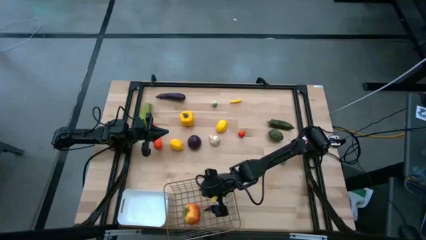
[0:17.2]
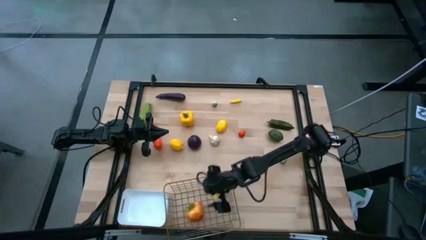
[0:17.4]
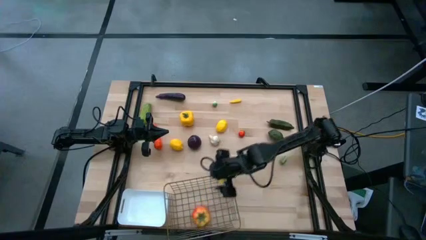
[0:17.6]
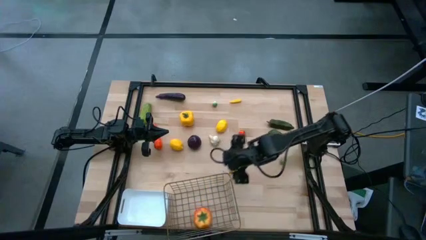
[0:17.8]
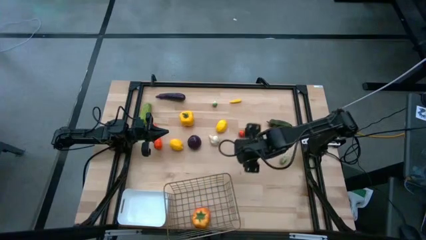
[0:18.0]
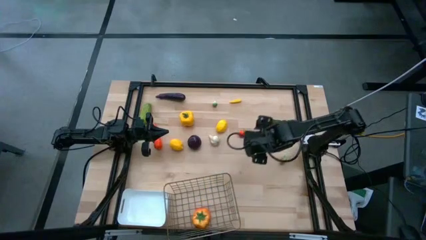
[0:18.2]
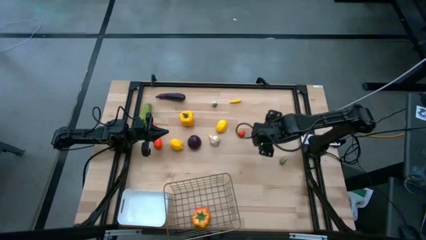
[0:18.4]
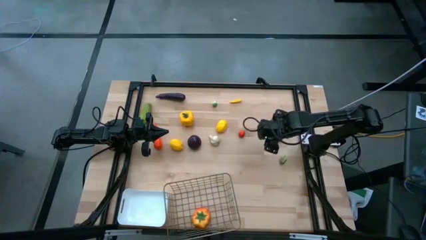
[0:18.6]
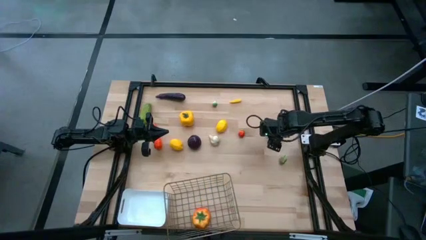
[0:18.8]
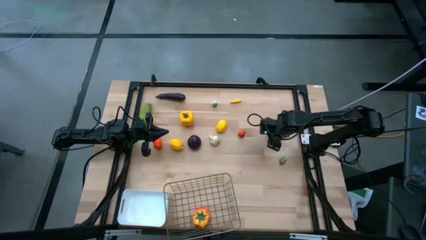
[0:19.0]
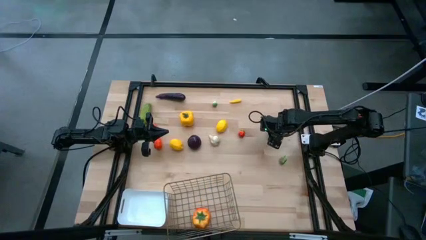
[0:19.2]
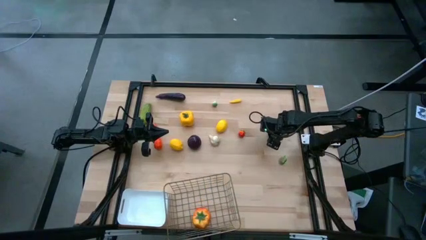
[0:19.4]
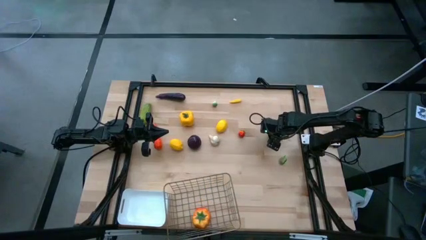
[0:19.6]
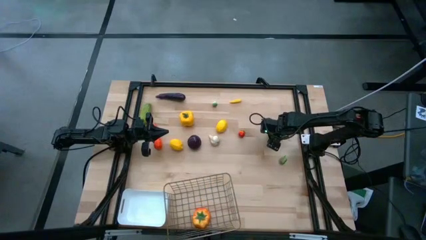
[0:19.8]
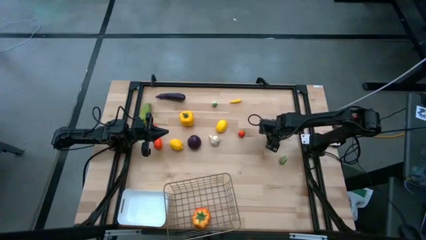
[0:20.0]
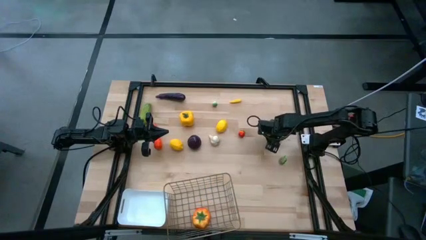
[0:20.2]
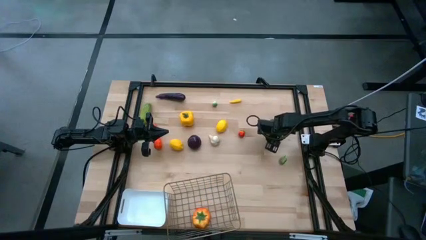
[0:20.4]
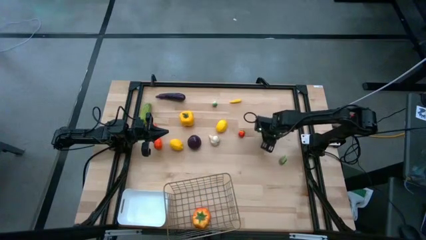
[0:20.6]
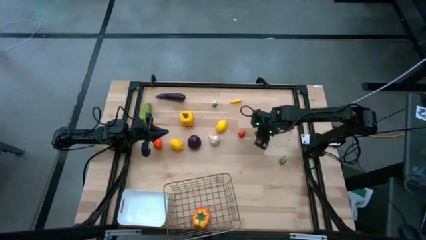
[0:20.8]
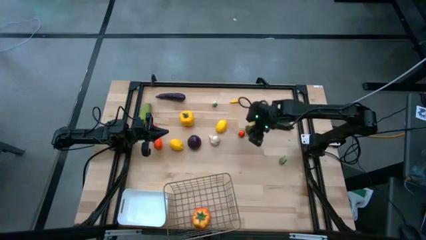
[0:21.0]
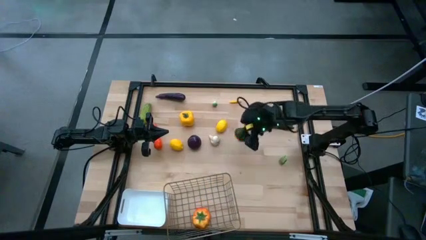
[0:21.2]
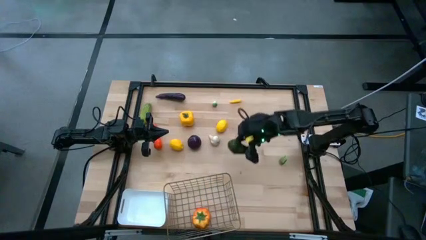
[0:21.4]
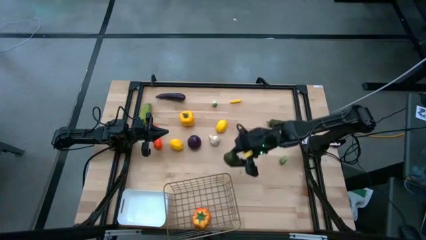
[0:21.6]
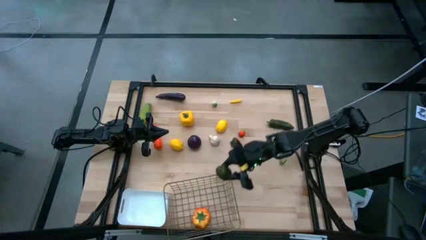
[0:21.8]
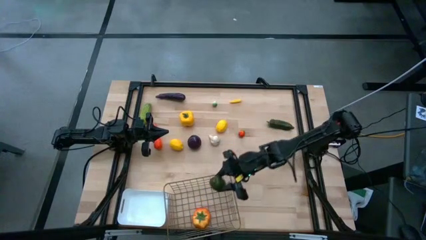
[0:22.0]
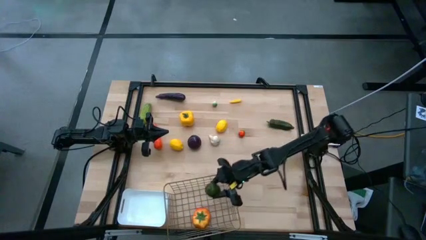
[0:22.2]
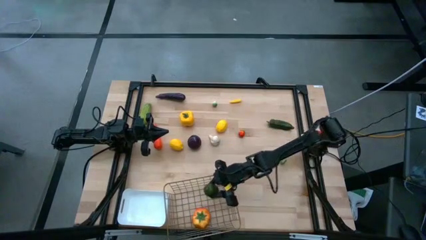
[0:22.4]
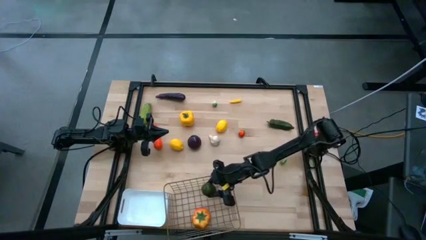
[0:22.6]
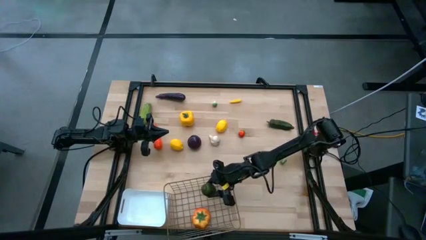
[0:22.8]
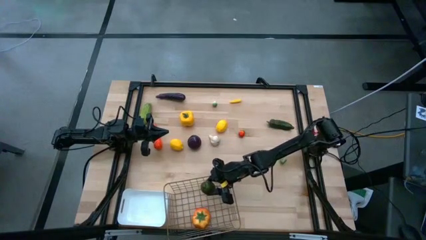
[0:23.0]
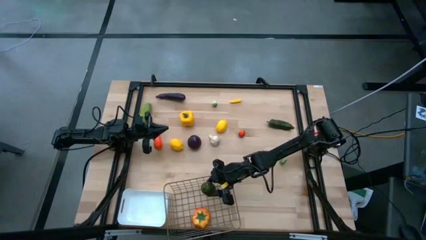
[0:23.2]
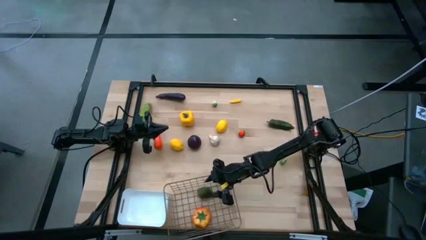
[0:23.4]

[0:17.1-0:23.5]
Task: Sort produce into baskets
Put the dark green lime into the wire basket

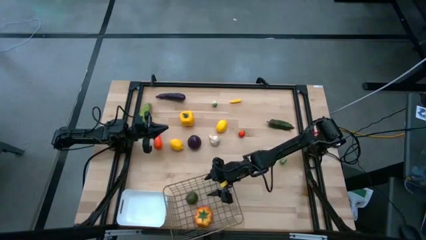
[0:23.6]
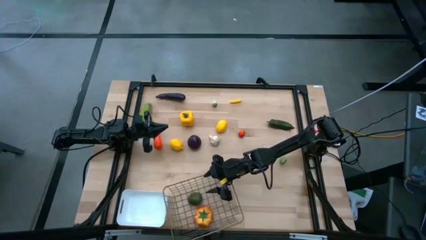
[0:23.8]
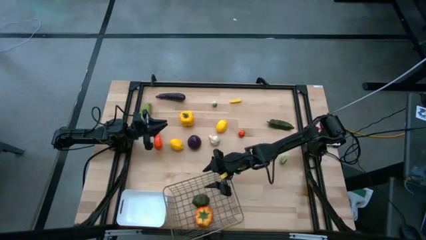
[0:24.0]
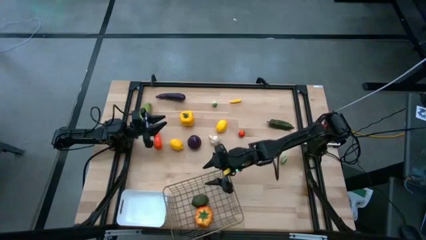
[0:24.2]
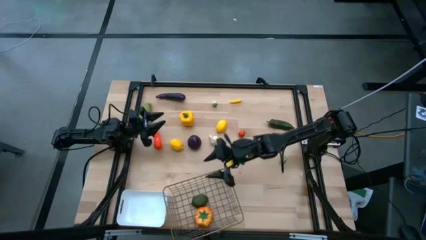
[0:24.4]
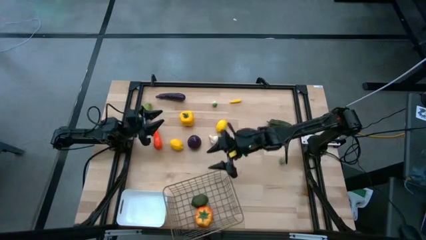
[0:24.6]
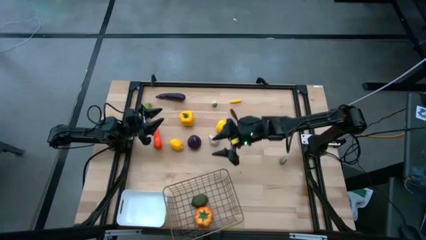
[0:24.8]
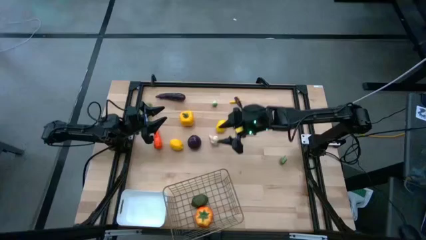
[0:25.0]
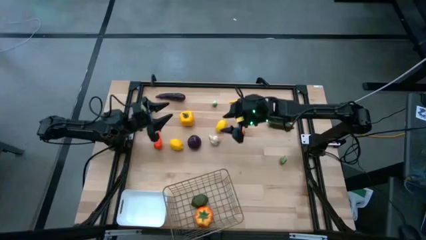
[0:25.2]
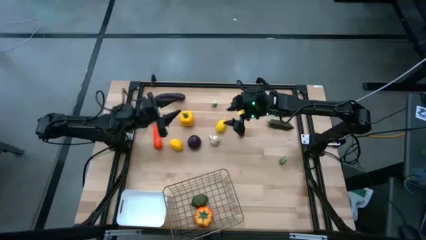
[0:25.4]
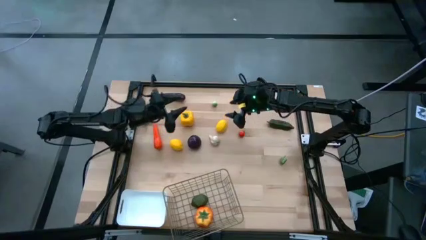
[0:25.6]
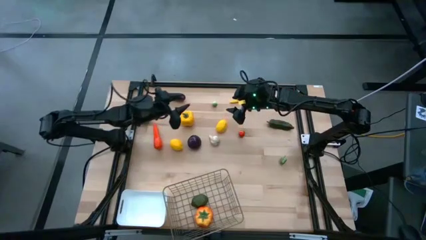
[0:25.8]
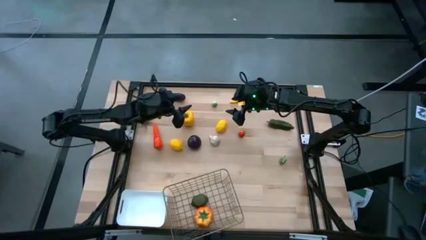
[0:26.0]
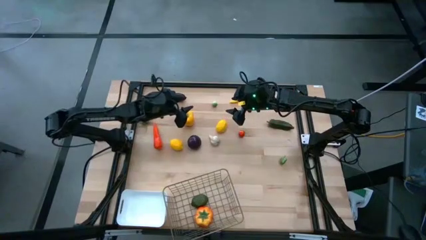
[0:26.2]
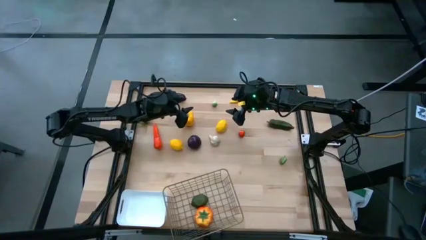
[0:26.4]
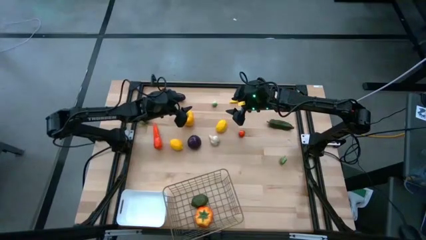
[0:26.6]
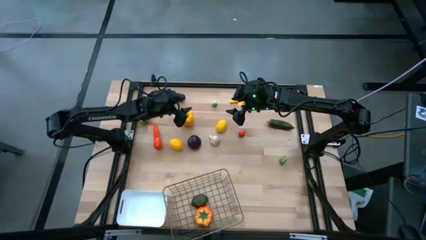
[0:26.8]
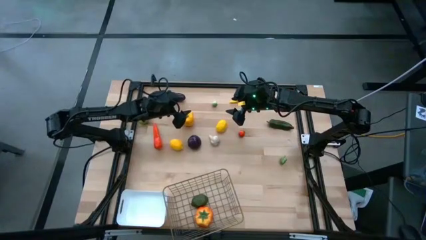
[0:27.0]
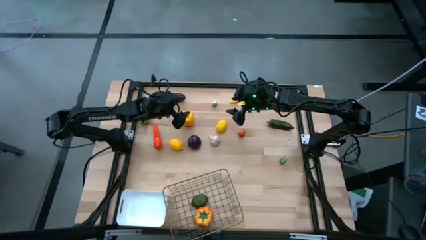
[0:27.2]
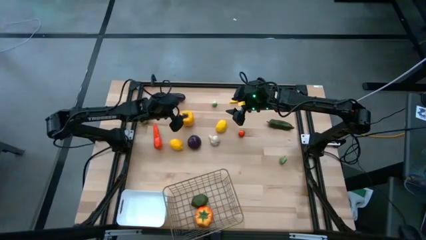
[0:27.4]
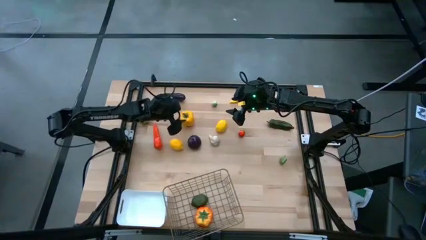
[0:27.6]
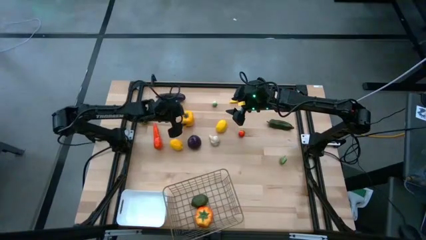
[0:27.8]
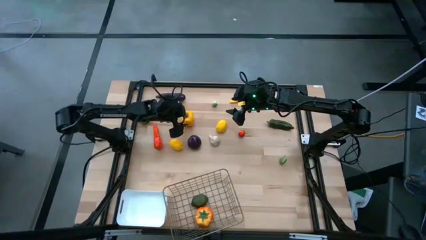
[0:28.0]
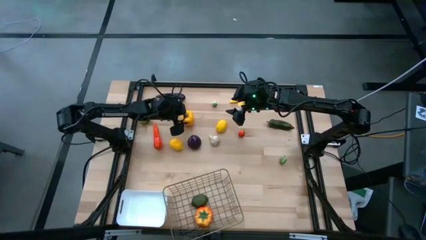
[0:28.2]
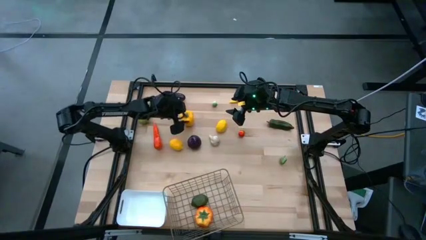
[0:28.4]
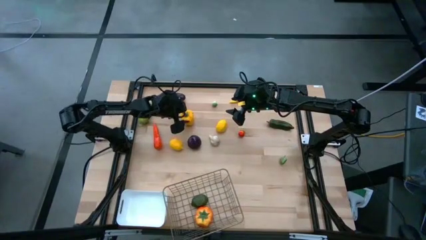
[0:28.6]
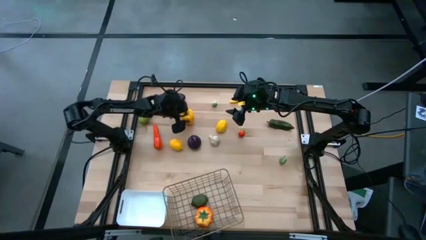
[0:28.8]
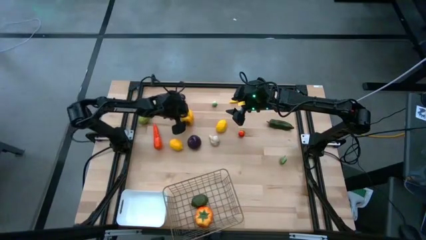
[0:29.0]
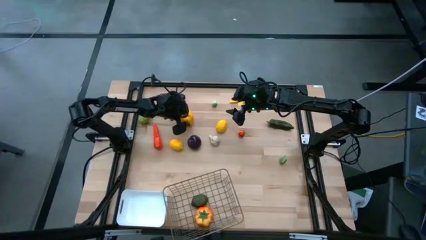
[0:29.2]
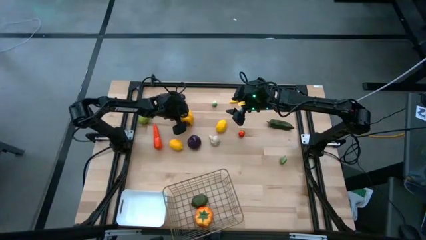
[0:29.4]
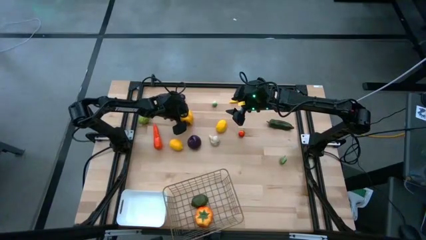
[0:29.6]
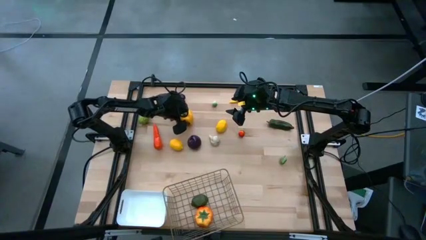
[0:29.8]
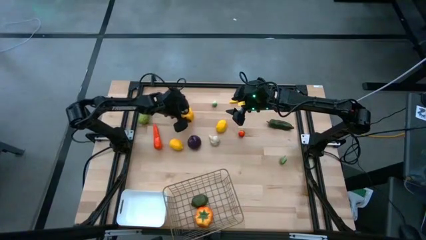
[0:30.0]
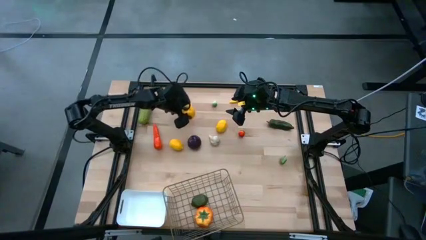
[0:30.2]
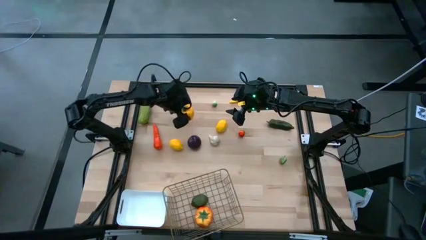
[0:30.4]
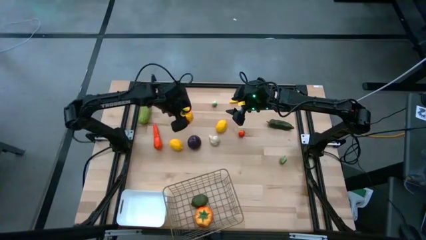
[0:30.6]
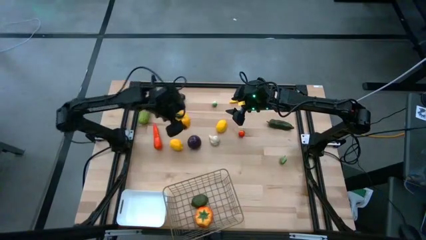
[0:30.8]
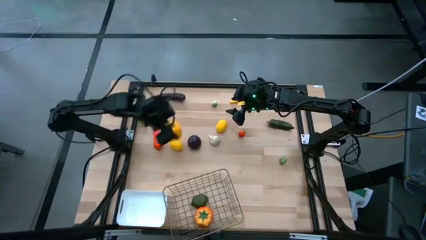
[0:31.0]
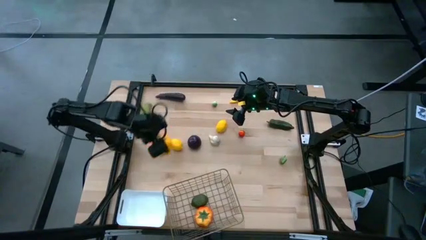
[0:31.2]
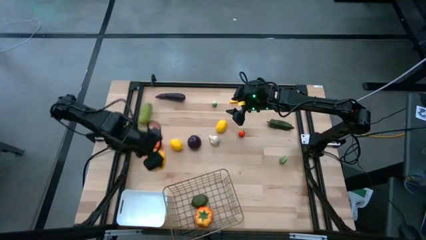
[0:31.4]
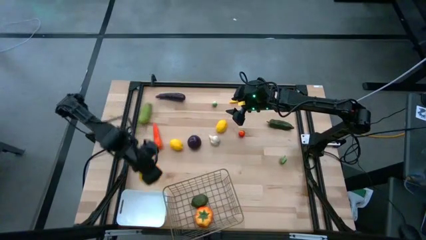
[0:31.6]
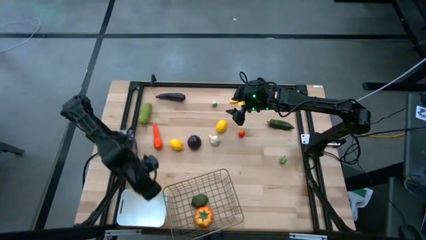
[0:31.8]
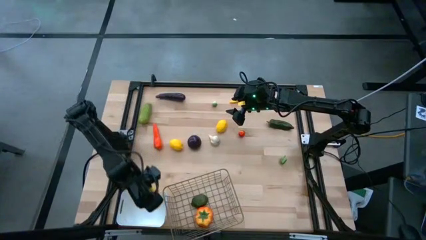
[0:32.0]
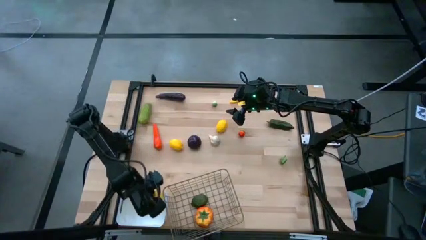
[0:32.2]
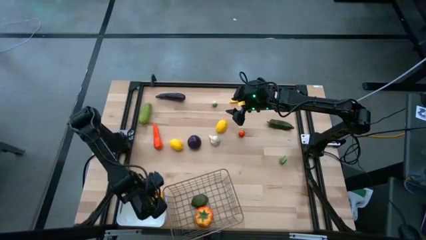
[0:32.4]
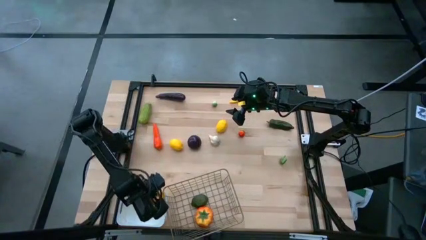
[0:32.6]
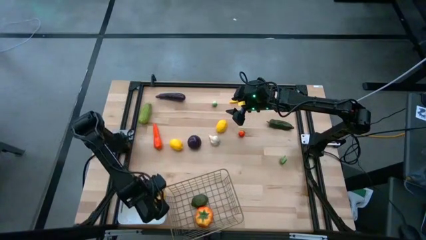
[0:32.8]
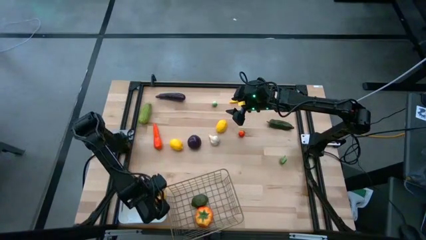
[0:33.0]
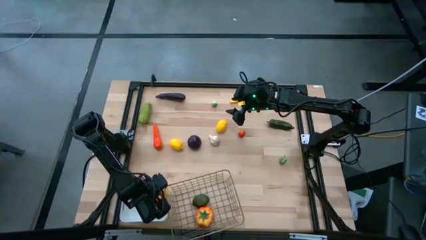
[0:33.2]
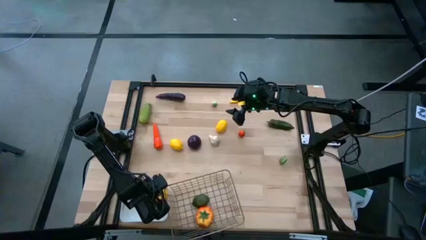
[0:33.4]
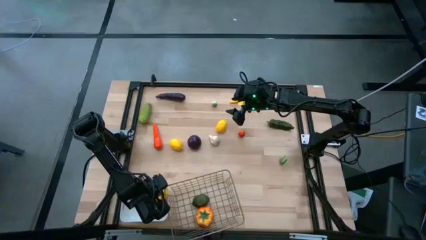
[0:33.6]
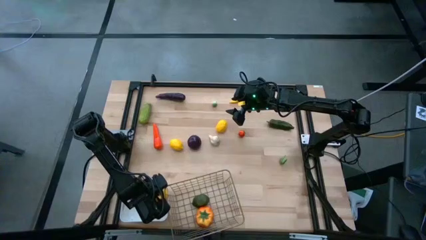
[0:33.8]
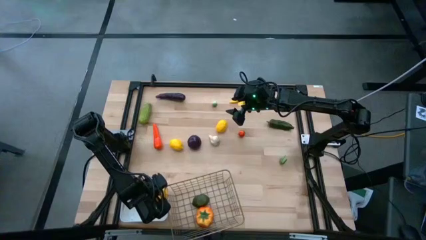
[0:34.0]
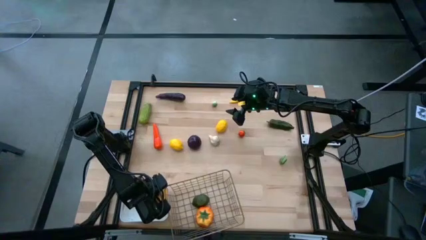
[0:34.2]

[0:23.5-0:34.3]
Put the yellow bell pepper into the white bin
